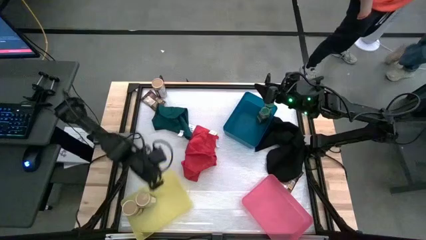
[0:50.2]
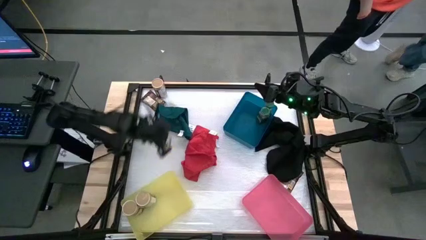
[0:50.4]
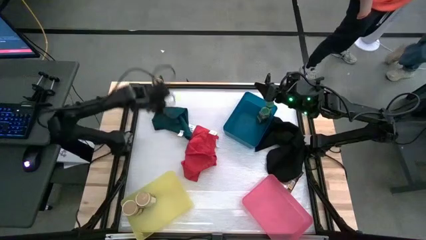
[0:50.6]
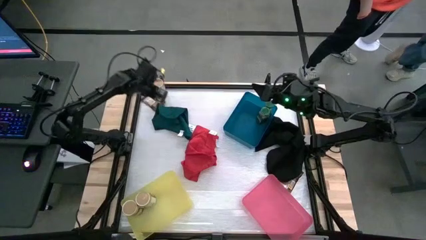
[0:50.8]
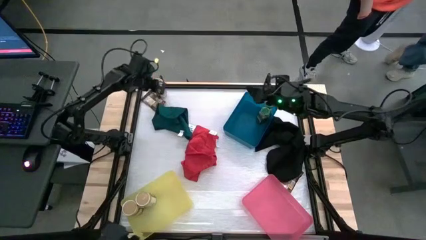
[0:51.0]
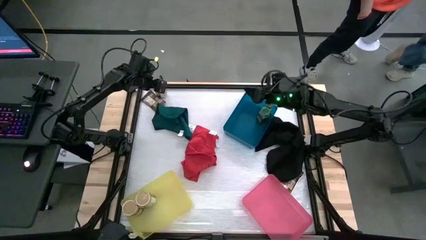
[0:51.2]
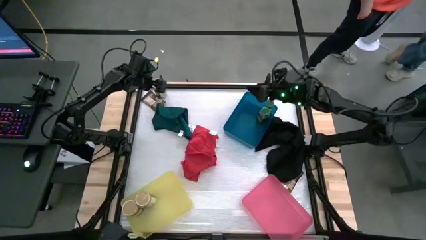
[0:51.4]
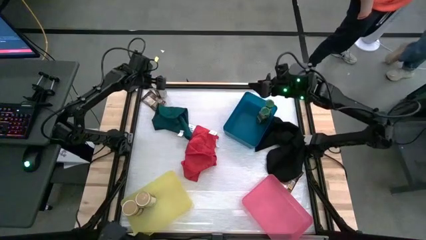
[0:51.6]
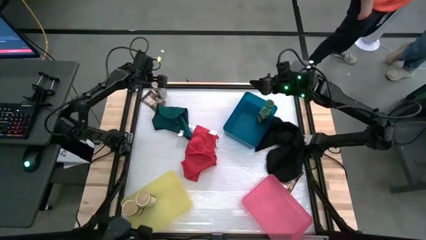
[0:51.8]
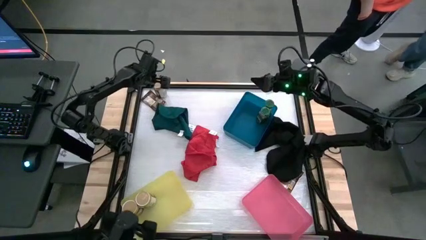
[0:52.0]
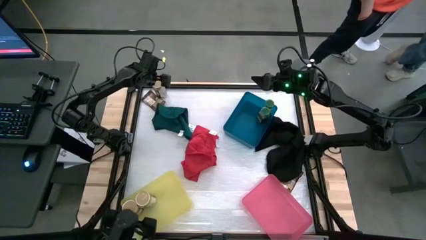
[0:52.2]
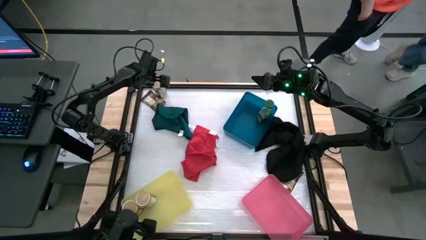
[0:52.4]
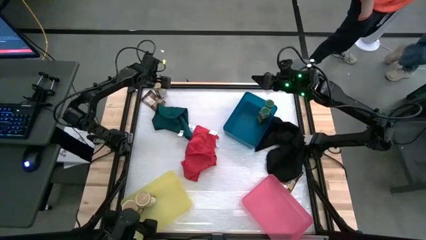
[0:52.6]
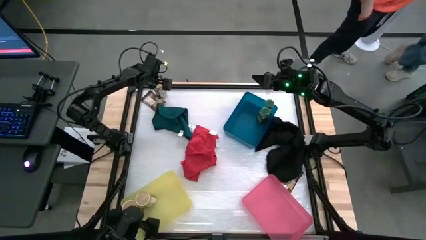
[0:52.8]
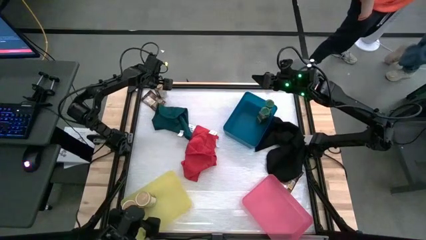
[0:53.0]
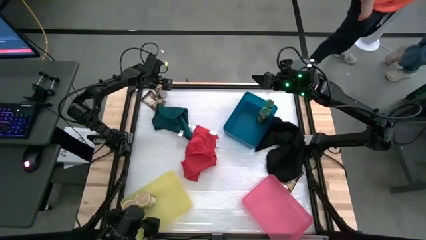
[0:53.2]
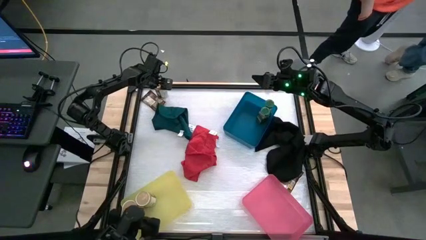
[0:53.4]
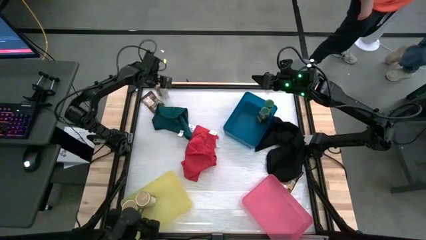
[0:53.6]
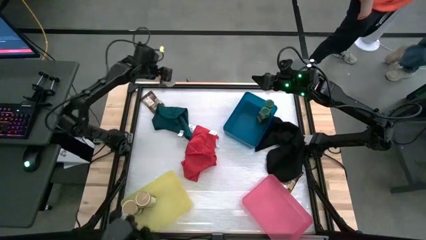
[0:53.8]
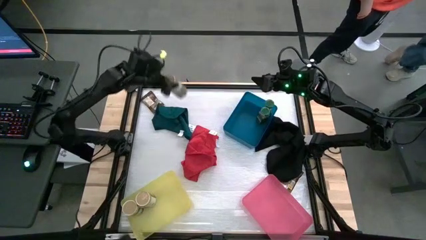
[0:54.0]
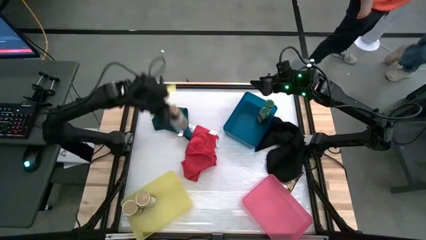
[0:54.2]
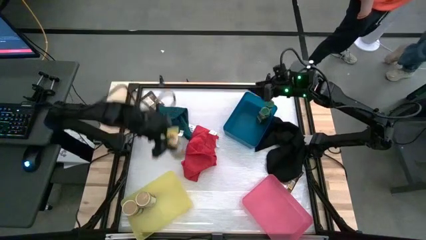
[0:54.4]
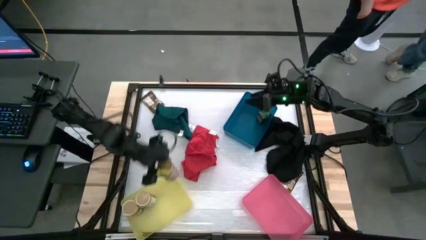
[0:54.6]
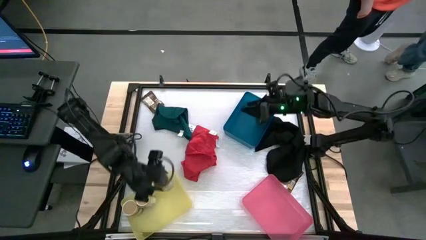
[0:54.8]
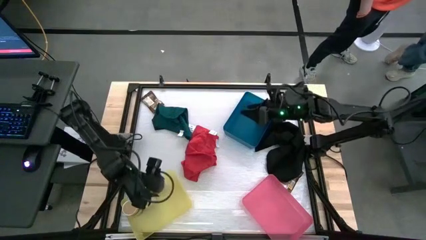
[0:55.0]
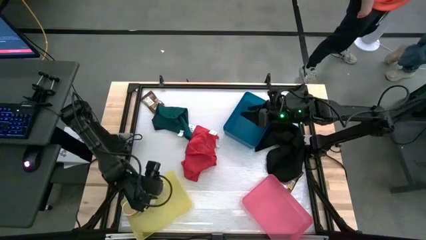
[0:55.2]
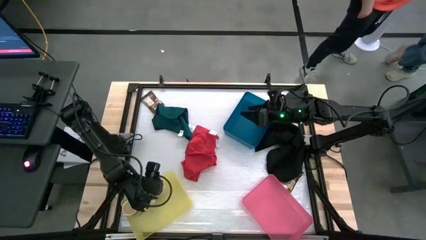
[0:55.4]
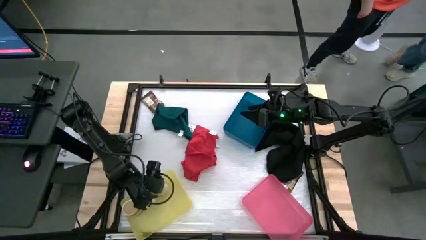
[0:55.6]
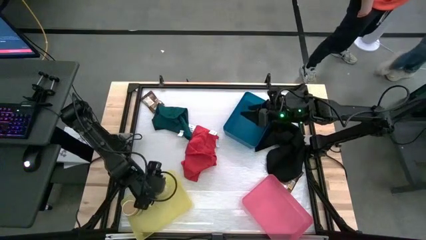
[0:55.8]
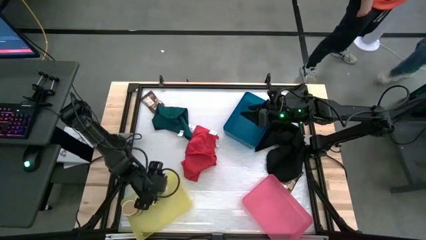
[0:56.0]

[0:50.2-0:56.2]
Task: Sort spices by type
Put the gold seasoning bottle into the yellow bin

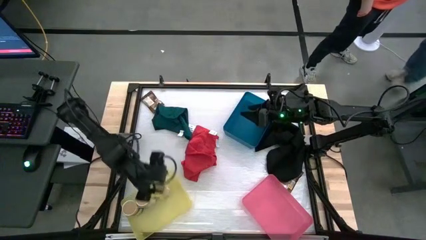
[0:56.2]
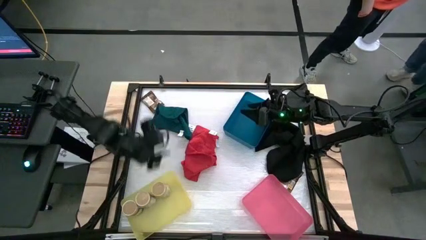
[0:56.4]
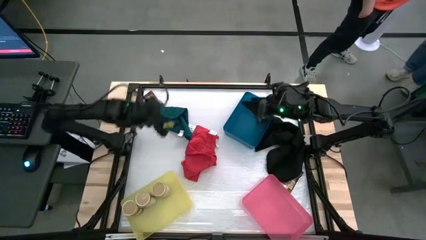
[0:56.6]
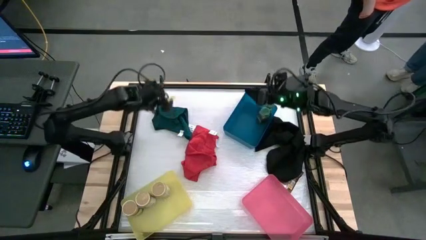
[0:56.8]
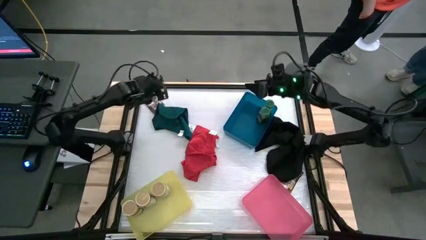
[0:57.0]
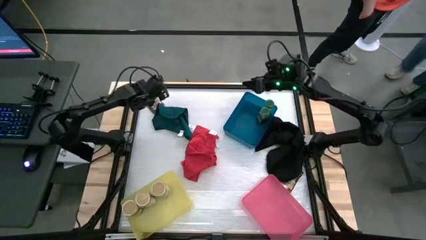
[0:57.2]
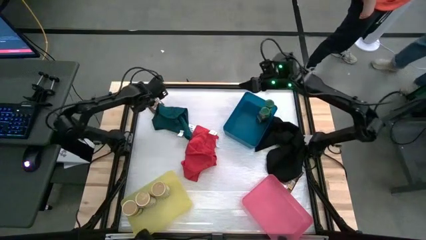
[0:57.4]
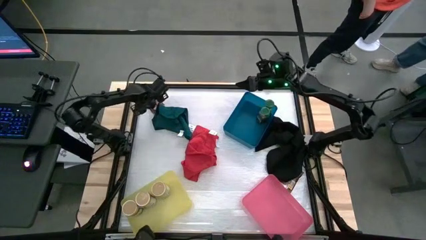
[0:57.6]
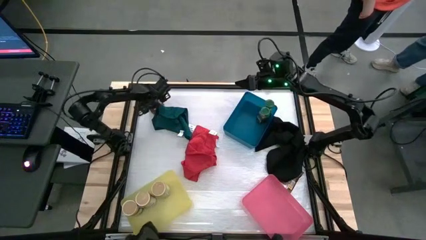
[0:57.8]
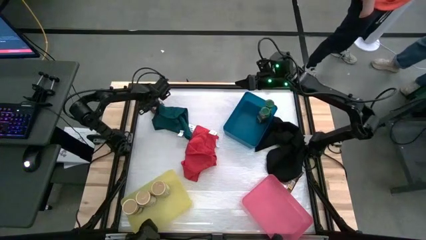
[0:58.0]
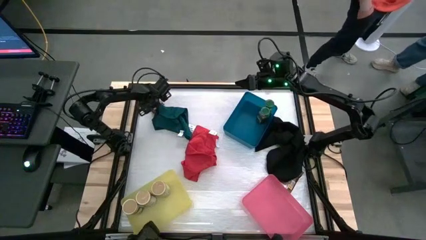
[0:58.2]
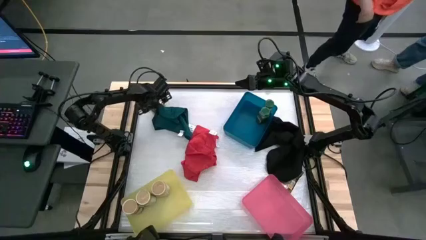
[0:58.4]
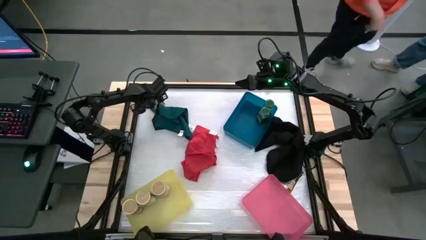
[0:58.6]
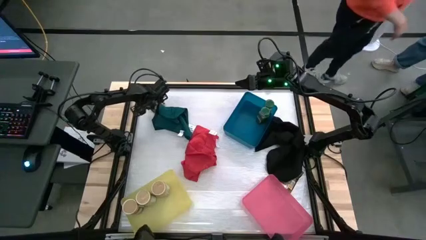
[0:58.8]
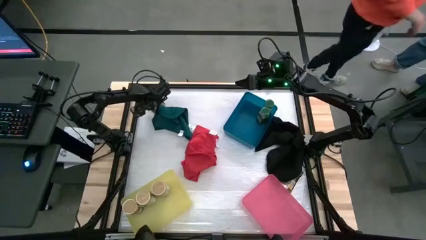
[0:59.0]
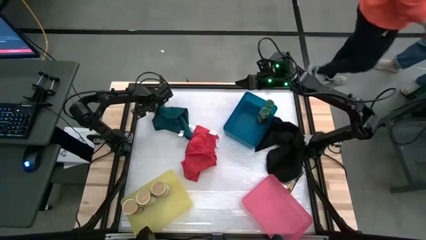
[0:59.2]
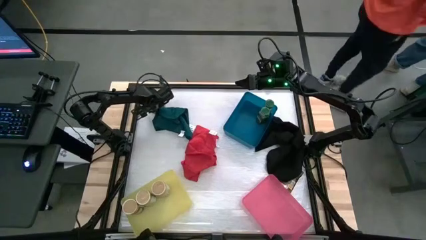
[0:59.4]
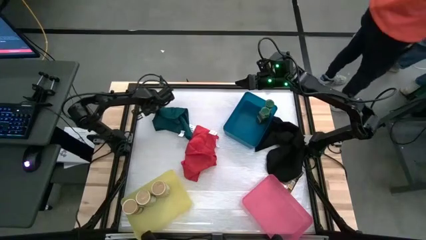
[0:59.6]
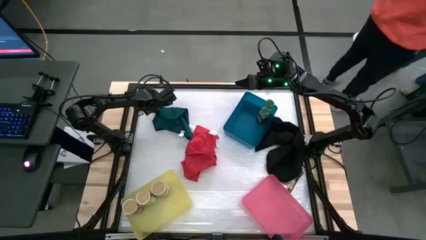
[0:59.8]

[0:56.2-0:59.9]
Put the top orange seasoning bag into the pink bin

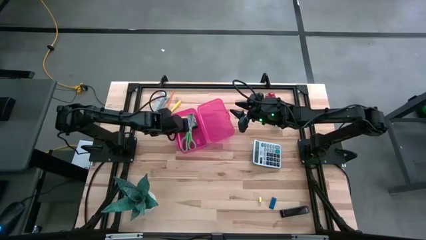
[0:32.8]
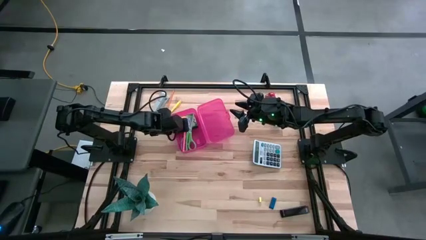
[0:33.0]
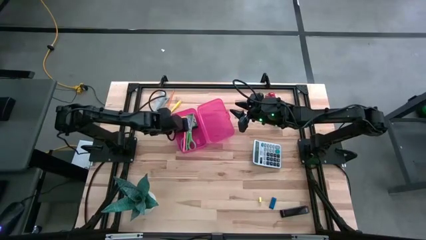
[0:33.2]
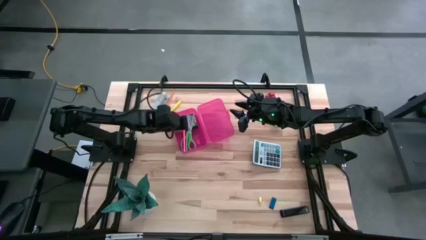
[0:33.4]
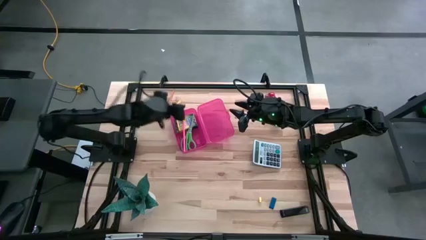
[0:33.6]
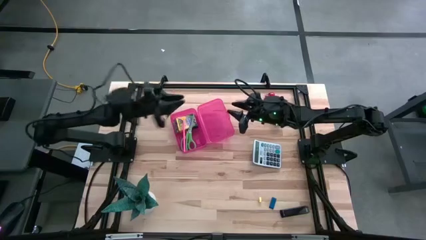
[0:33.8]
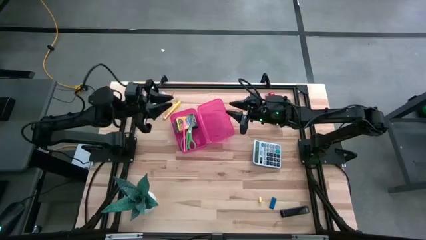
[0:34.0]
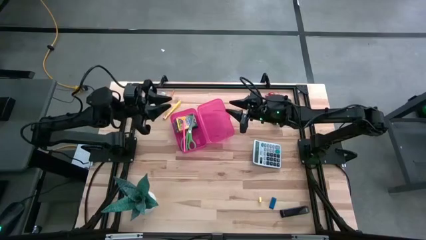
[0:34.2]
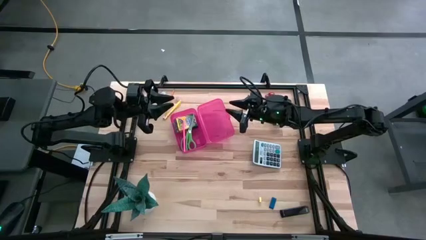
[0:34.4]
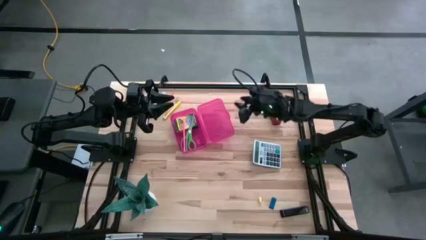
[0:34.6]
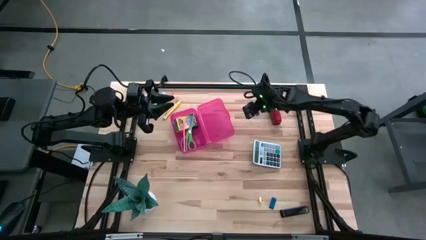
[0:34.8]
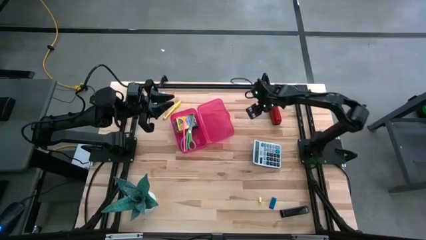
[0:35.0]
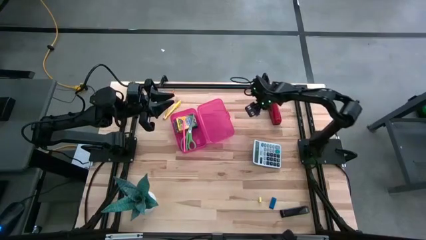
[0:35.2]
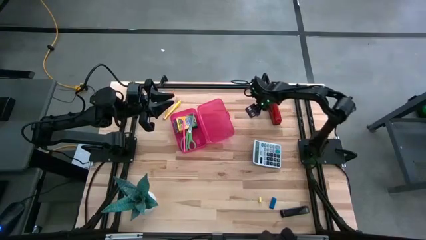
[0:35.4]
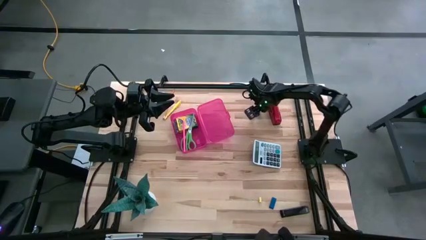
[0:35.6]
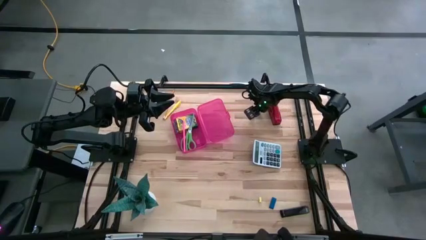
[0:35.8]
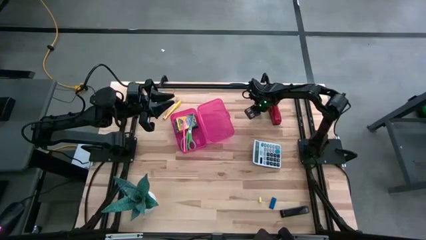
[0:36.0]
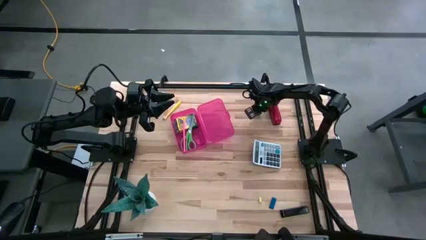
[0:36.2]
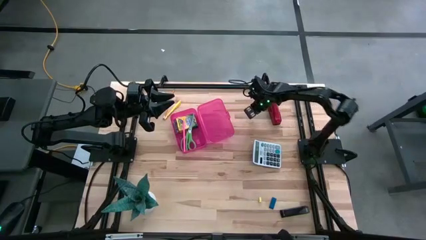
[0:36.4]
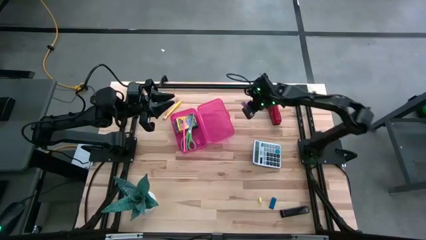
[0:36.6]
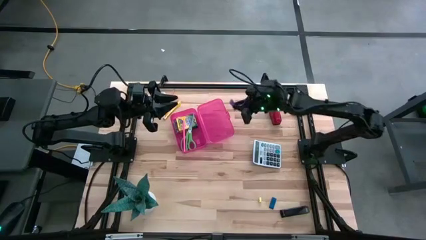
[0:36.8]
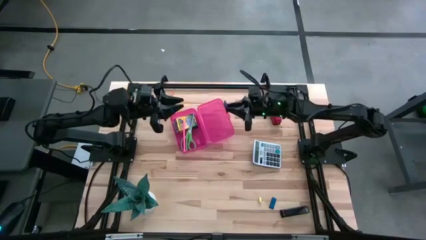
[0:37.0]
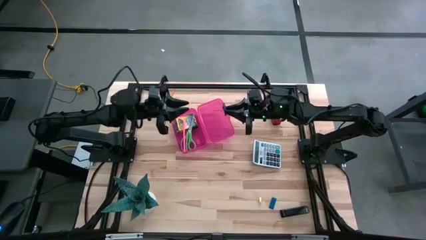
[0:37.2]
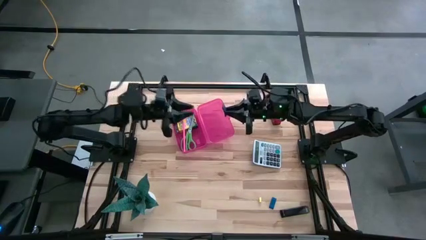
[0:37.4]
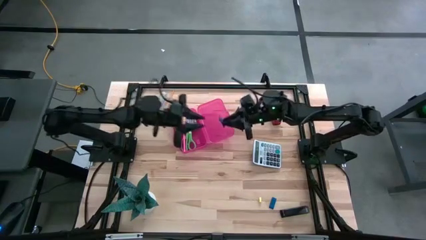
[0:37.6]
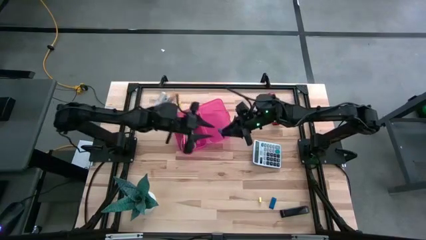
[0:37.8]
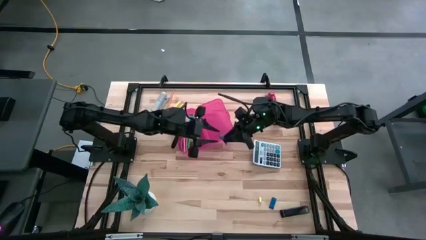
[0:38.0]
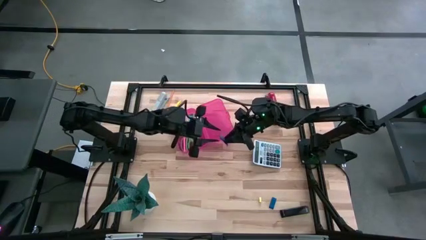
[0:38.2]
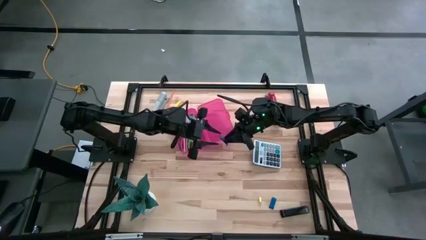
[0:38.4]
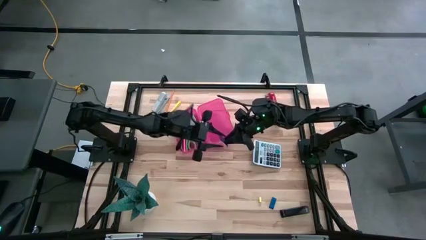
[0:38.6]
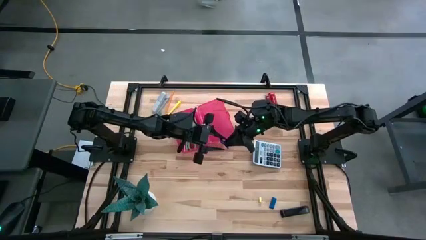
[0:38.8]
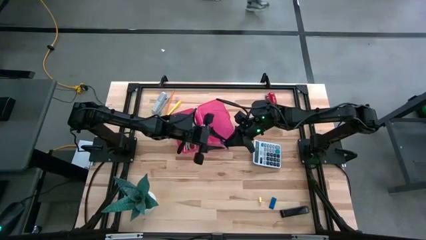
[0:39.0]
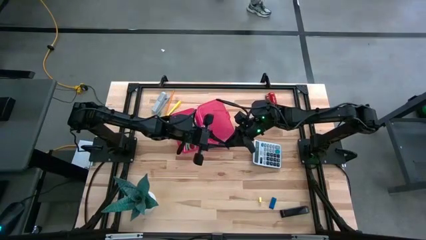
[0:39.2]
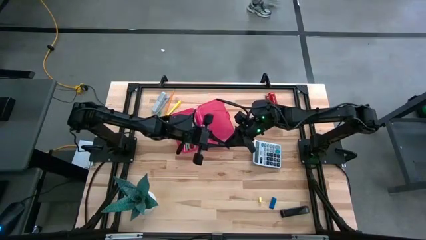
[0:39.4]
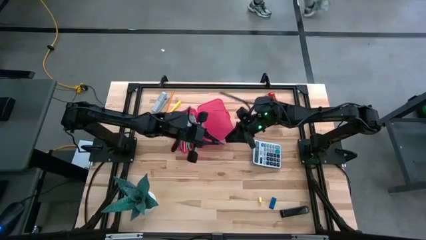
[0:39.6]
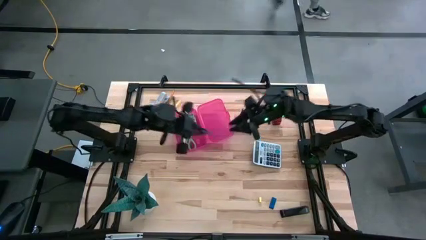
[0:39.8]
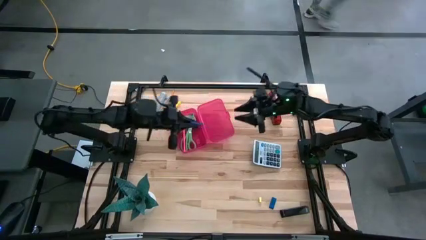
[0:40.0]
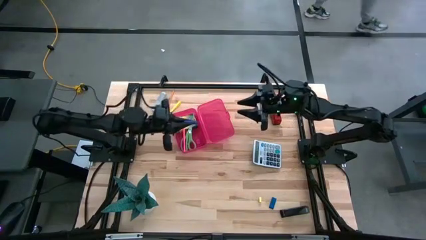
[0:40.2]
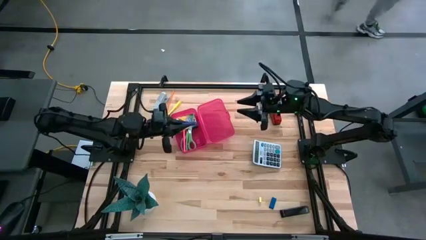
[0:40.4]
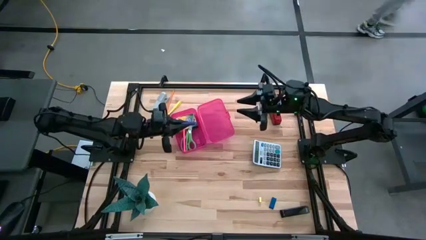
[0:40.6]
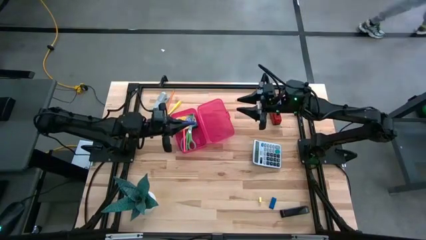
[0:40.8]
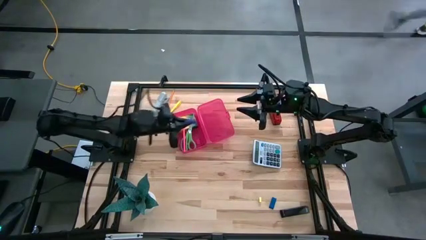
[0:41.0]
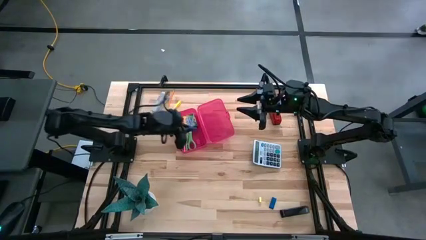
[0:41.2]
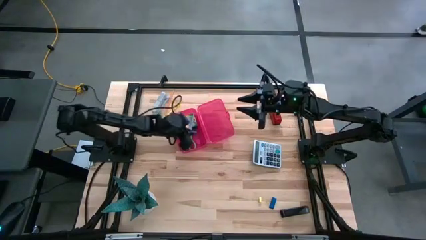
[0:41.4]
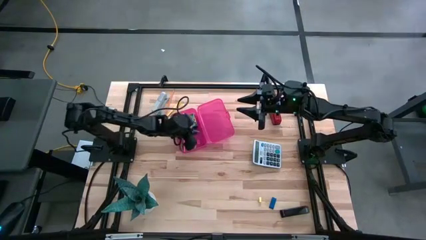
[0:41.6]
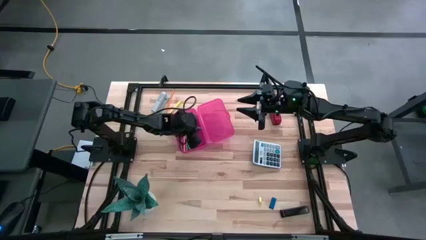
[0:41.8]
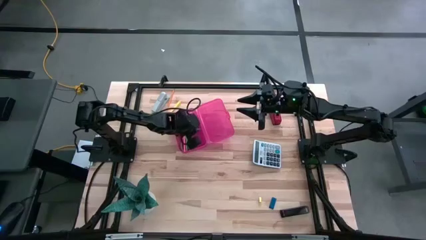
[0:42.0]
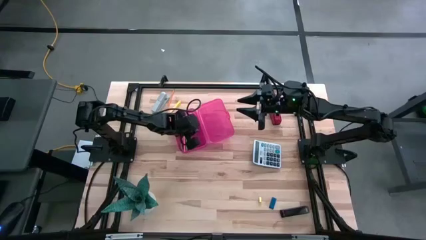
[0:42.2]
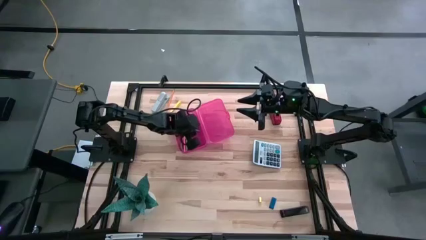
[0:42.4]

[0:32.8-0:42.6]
Task: Pack school essentials
Put the top blue eraser into the pink pencil box
